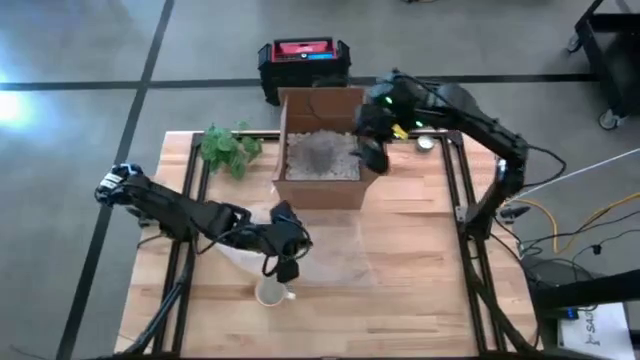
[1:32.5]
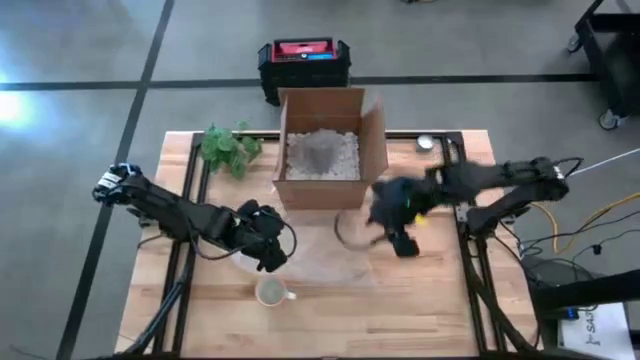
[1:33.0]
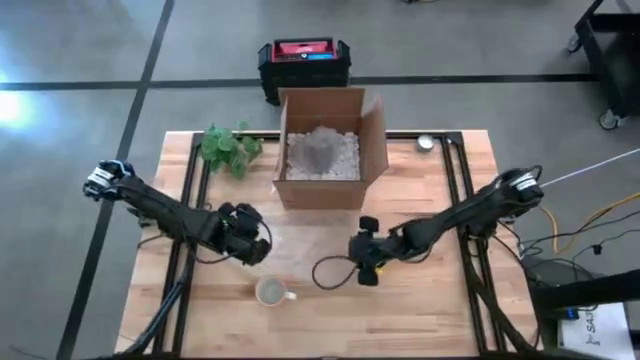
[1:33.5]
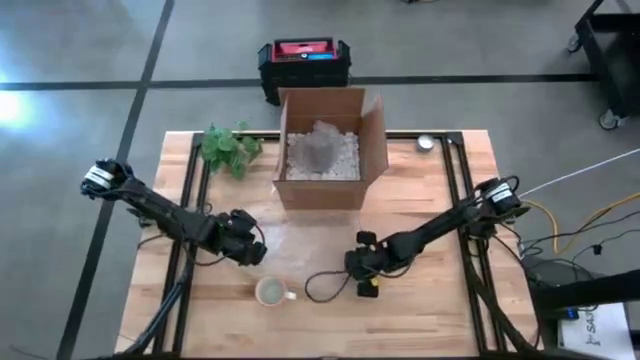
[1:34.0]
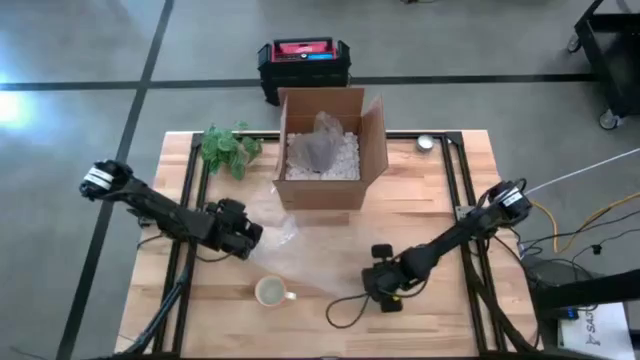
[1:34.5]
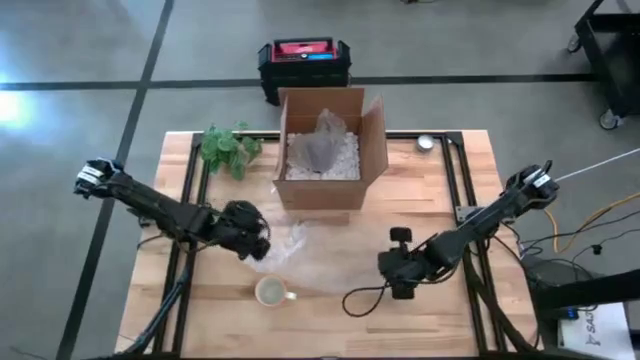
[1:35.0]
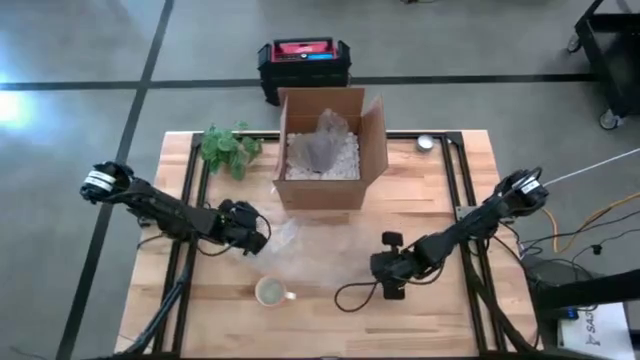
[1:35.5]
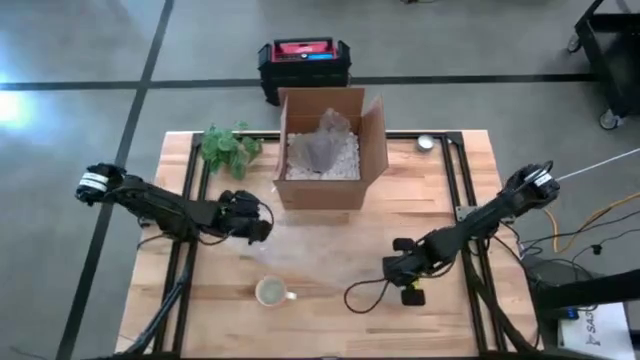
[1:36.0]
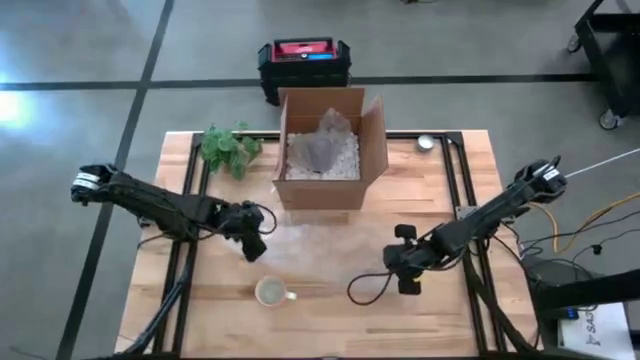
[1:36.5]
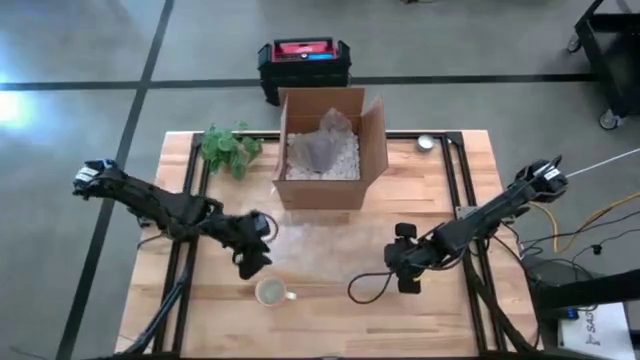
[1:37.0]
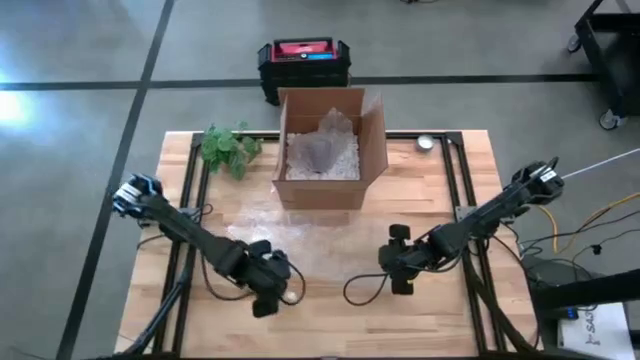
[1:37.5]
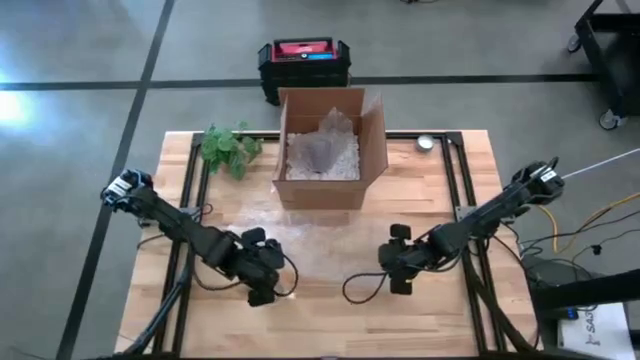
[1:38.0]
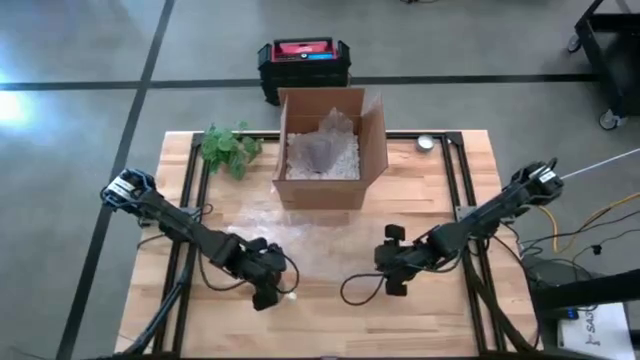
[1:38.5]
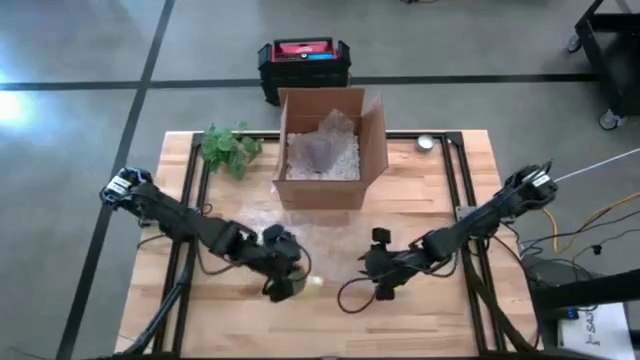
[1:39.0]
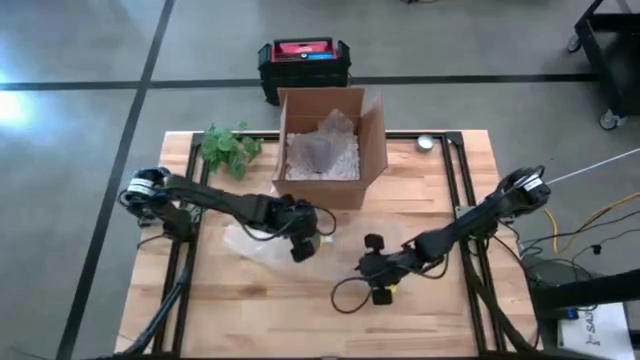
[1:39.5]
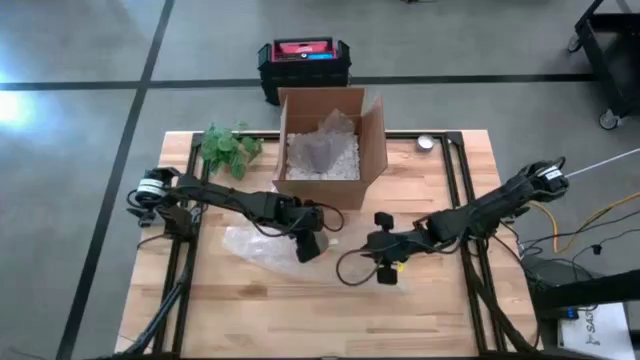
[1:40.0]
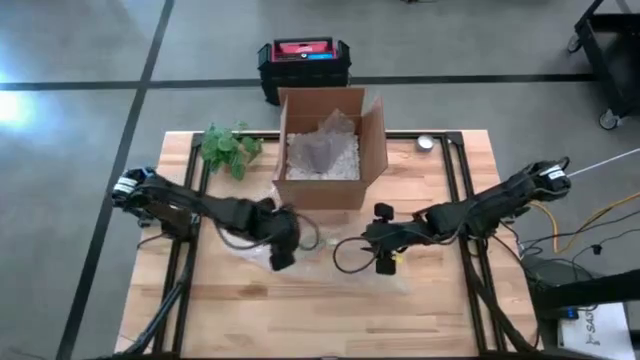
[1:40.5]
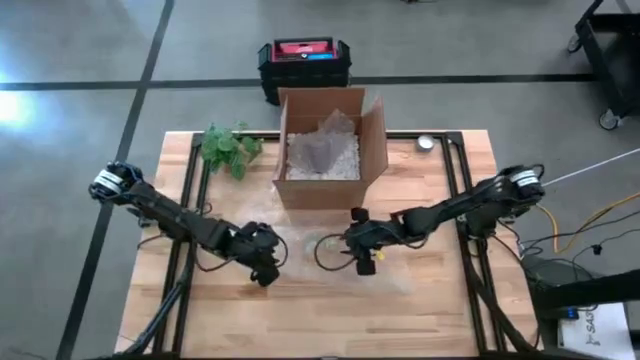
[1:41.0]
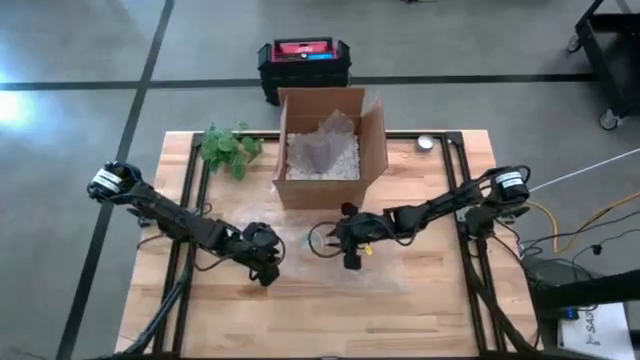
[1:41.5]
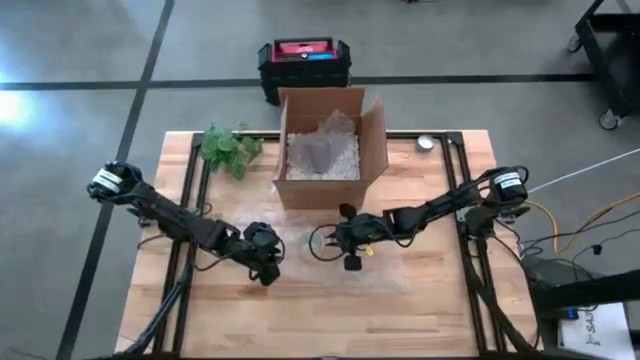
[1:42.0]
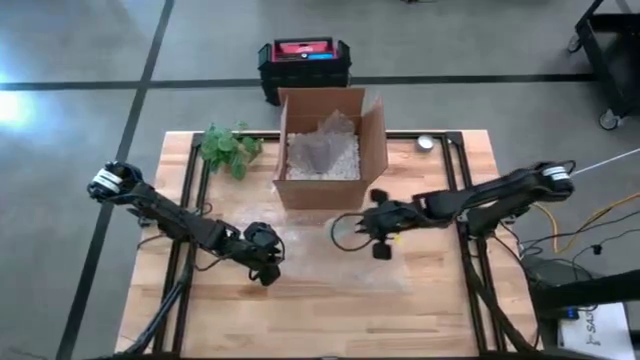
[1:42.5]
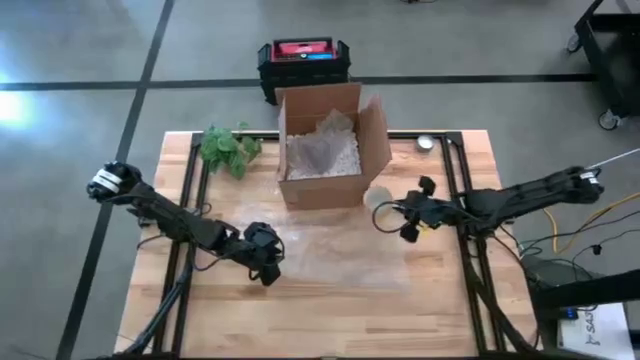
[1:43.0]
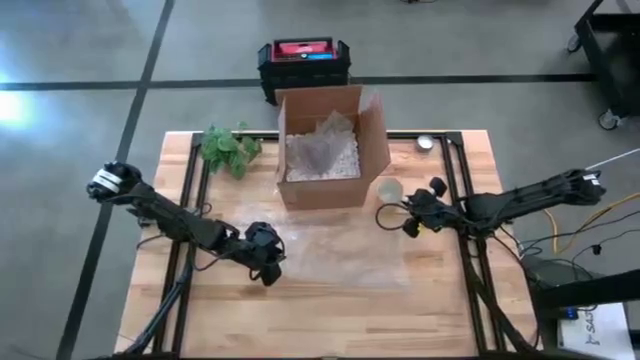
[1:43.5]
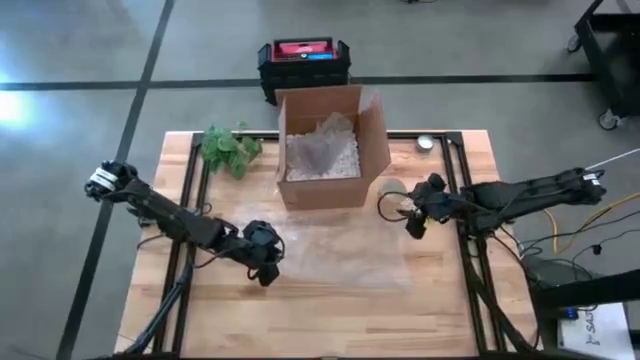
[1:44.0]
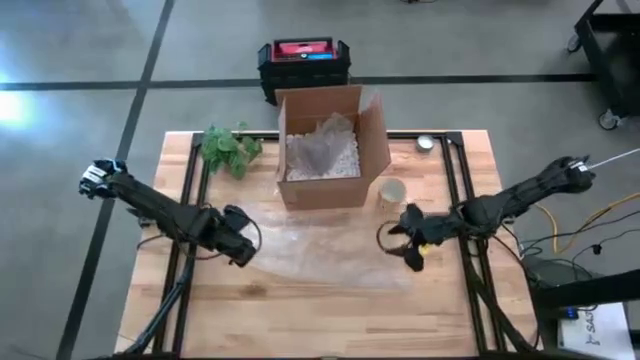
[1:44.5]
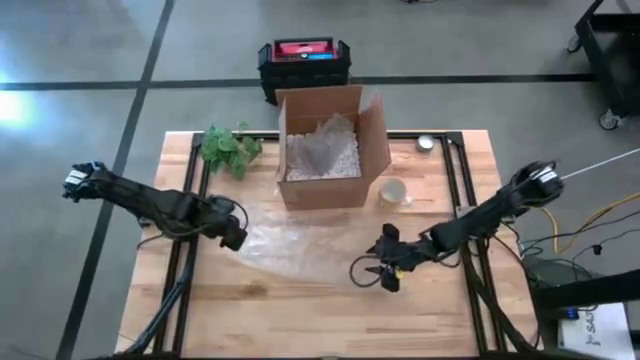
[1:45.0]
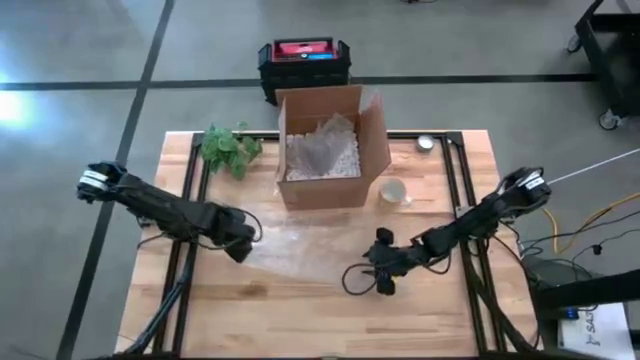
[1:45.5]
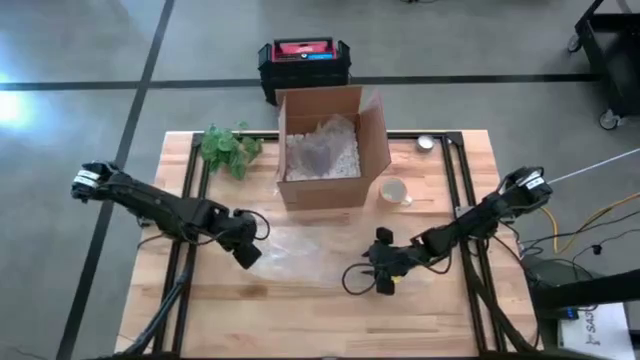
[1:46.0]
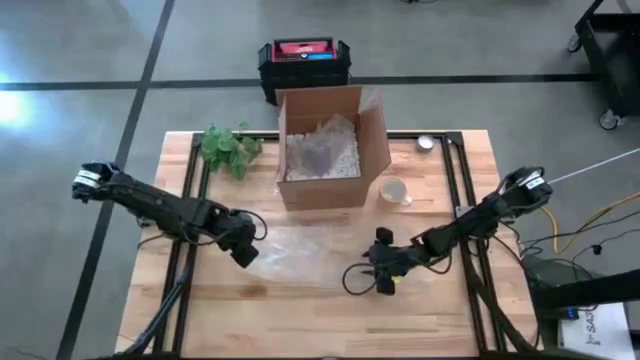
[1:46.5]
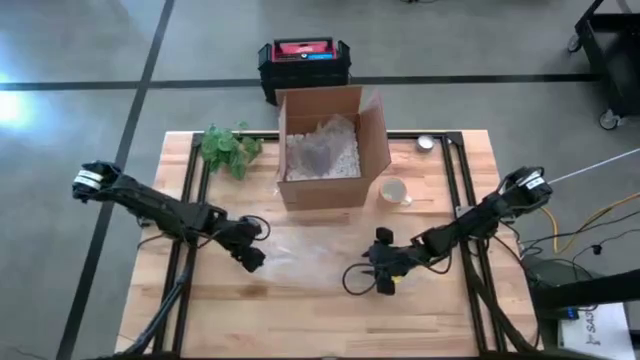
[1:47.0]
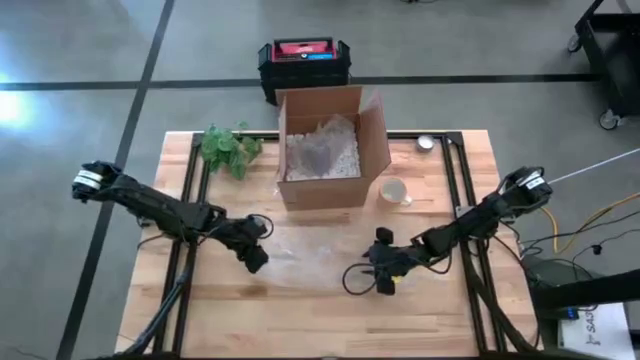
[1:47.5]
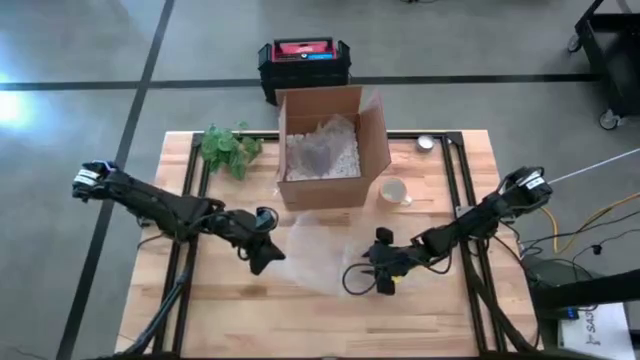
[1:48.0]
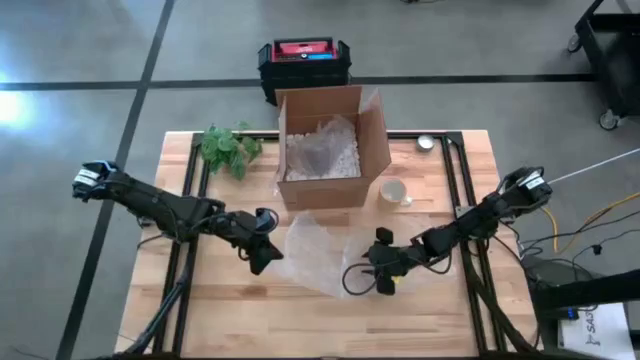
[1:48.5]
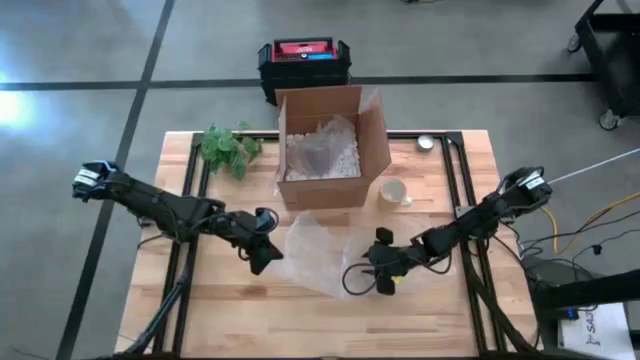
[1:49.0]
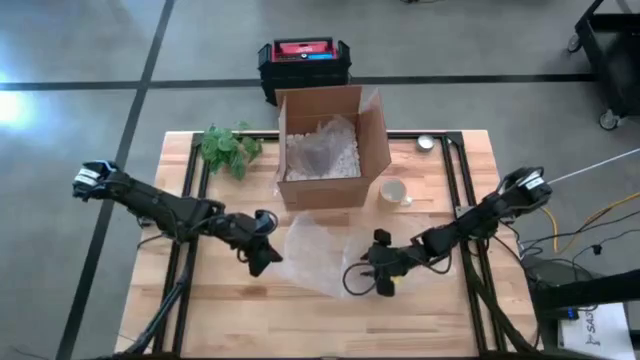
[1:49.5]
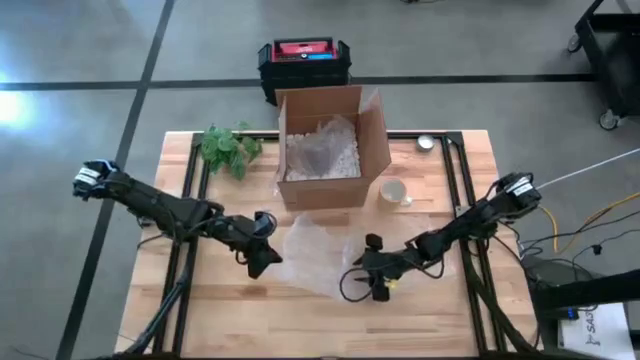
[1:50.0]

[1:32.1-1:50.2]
Task: wrap mug
Wrap the yellow mug with a bubble wrap

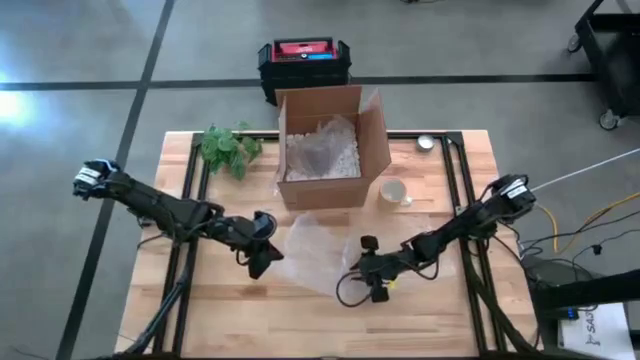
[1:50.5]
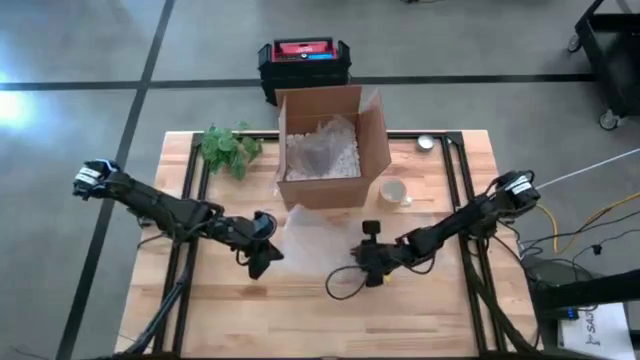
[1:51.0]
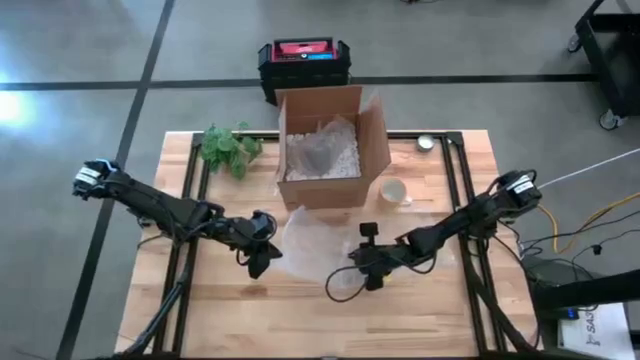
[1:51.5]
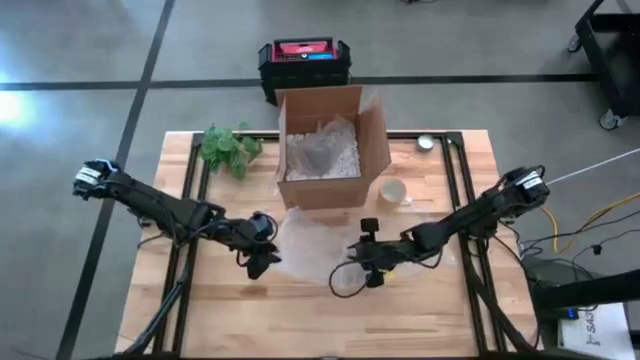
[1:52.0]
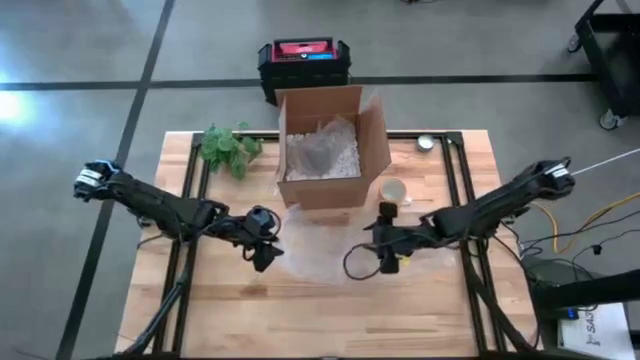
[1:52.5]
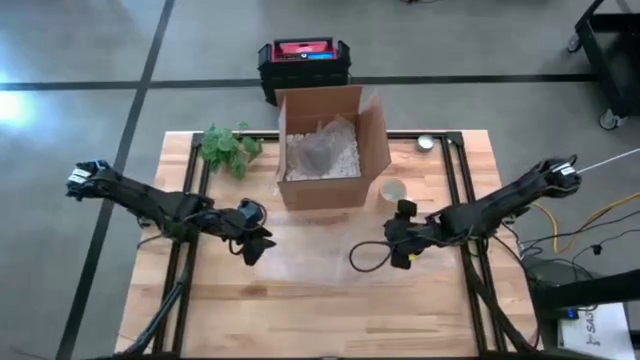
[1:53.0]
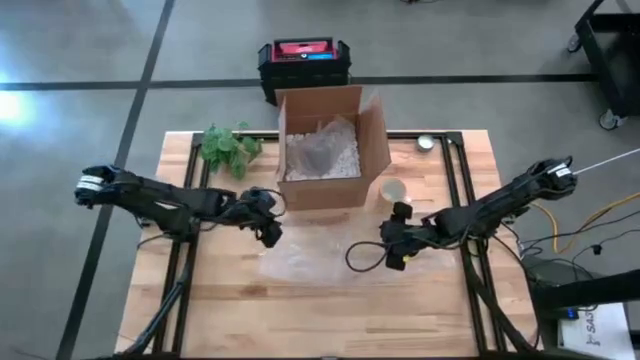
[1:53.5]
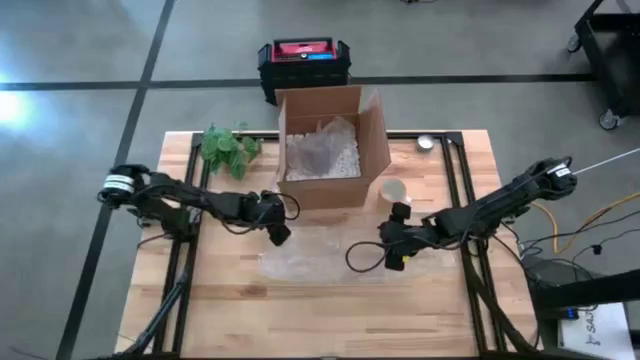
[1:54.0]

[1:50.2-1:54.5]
Wrap the yellow mug with a bubble wrap
